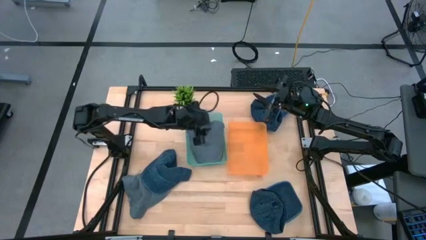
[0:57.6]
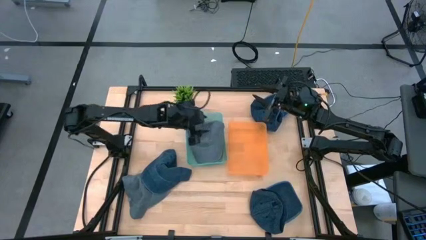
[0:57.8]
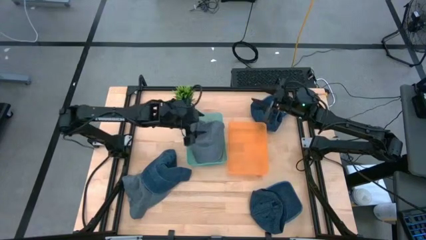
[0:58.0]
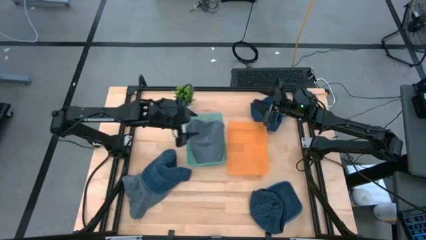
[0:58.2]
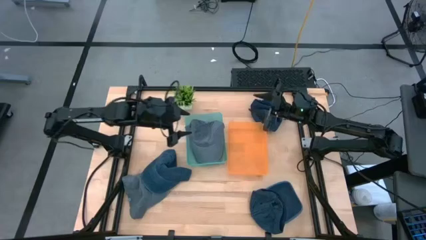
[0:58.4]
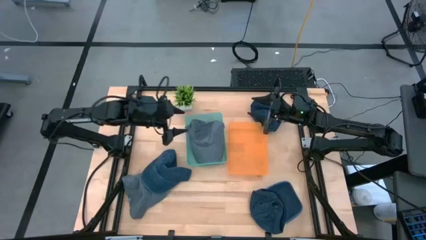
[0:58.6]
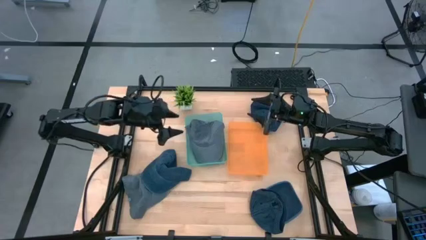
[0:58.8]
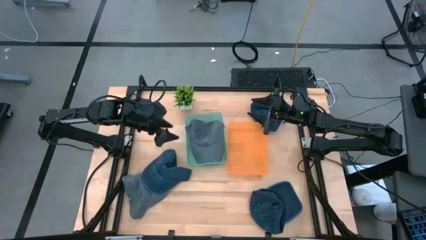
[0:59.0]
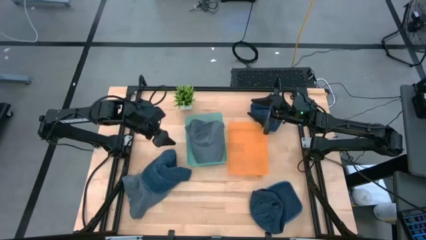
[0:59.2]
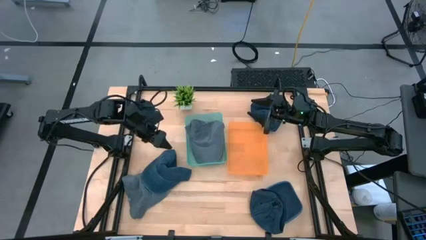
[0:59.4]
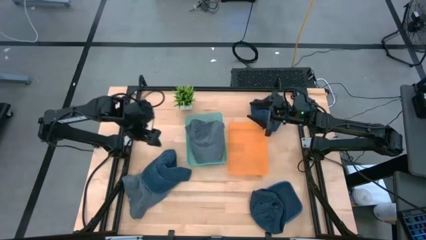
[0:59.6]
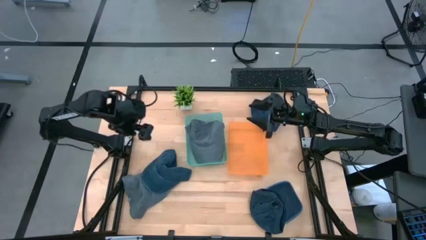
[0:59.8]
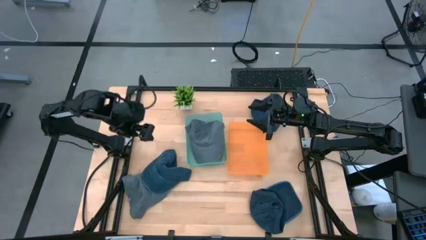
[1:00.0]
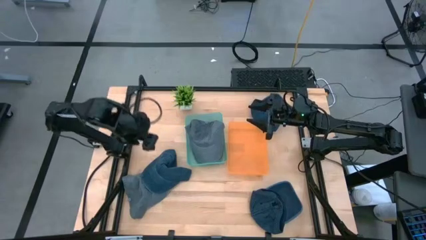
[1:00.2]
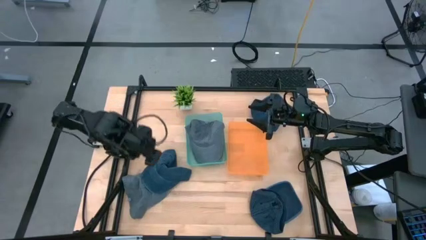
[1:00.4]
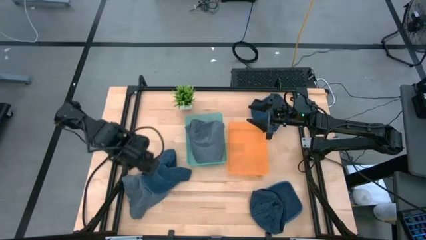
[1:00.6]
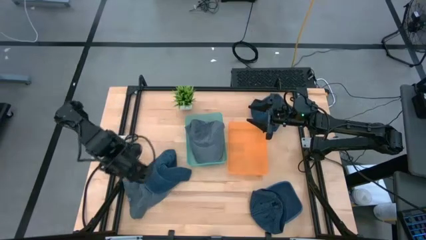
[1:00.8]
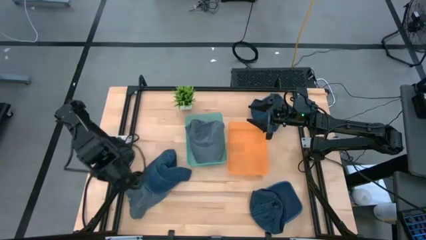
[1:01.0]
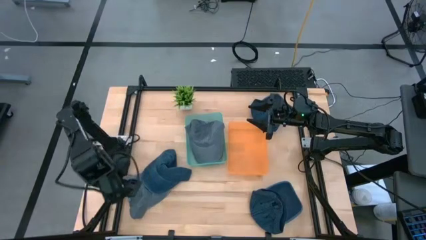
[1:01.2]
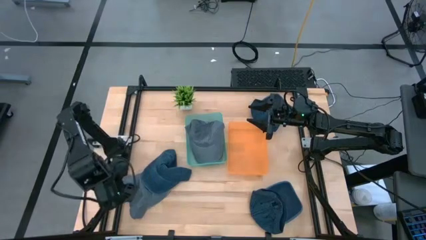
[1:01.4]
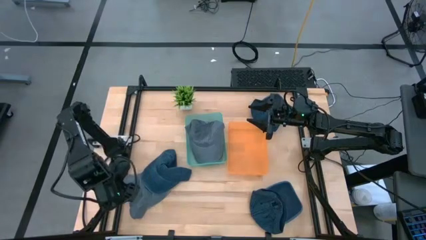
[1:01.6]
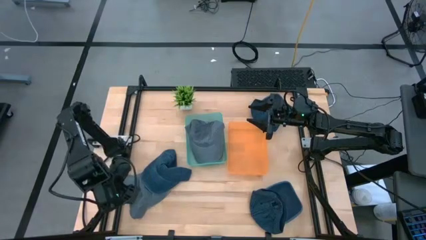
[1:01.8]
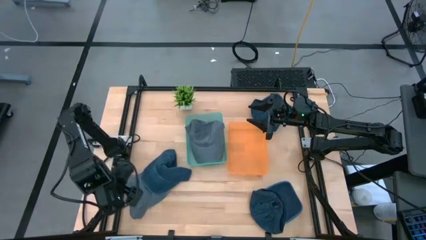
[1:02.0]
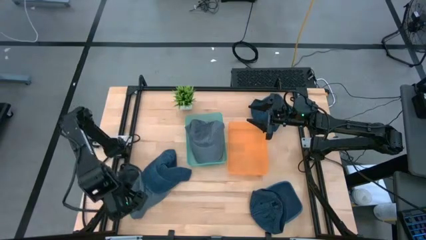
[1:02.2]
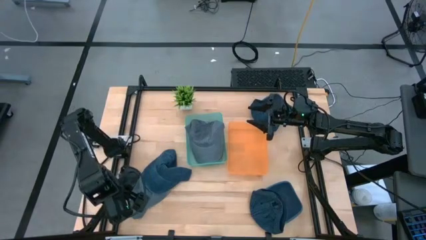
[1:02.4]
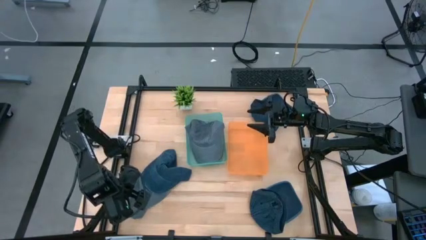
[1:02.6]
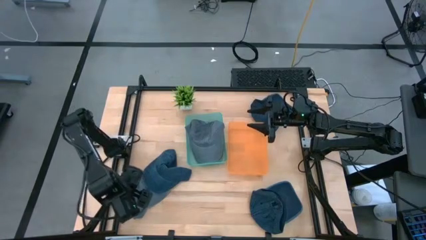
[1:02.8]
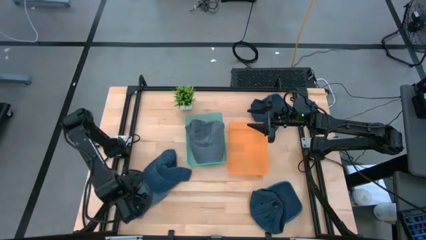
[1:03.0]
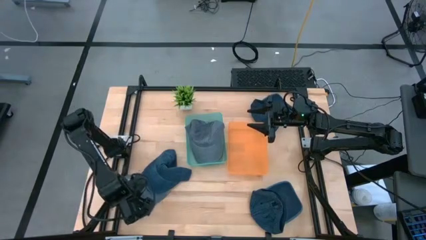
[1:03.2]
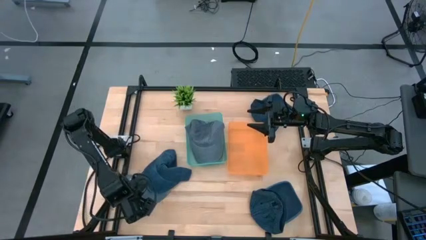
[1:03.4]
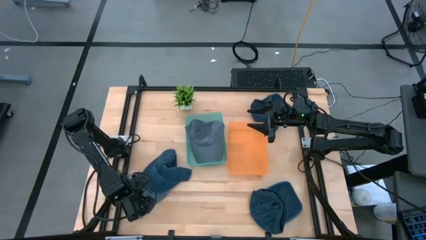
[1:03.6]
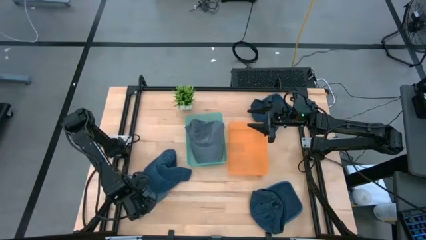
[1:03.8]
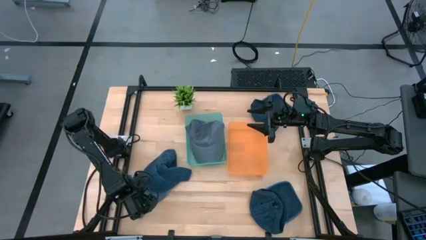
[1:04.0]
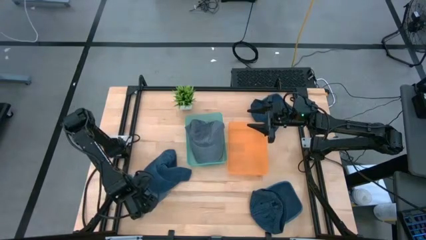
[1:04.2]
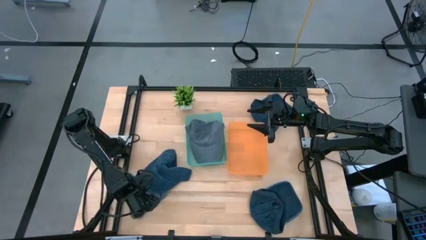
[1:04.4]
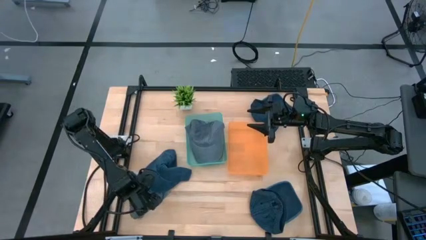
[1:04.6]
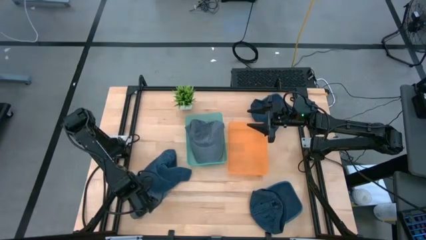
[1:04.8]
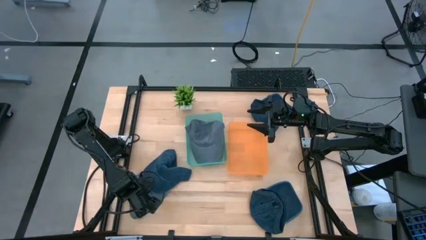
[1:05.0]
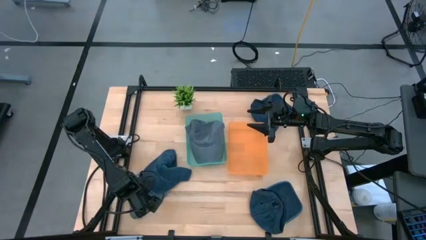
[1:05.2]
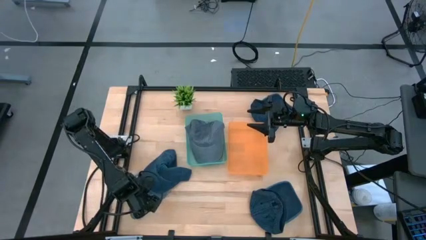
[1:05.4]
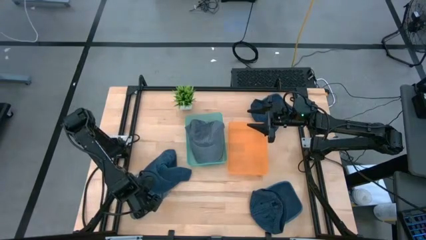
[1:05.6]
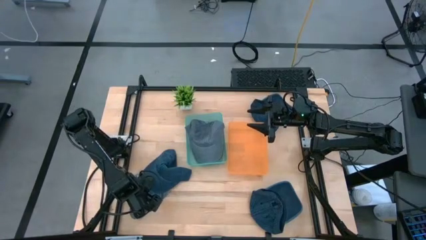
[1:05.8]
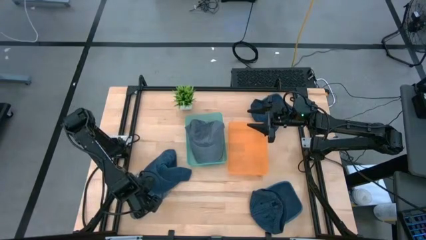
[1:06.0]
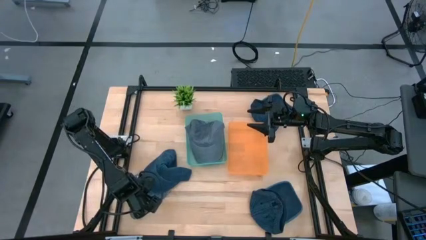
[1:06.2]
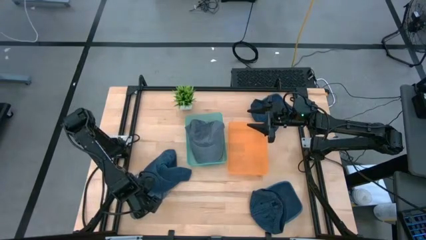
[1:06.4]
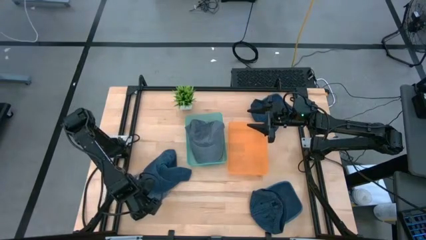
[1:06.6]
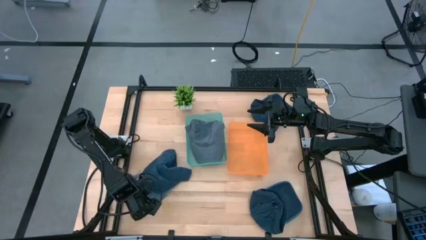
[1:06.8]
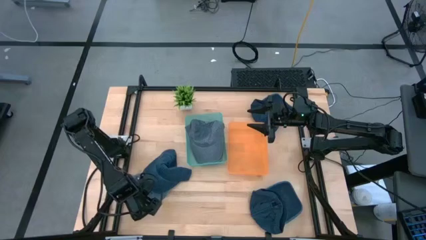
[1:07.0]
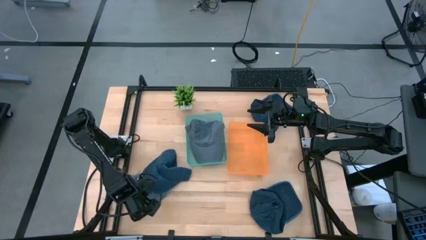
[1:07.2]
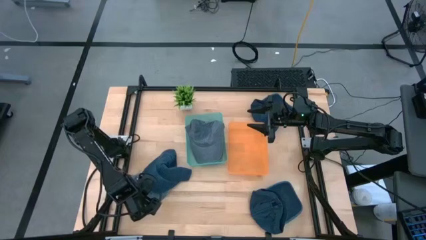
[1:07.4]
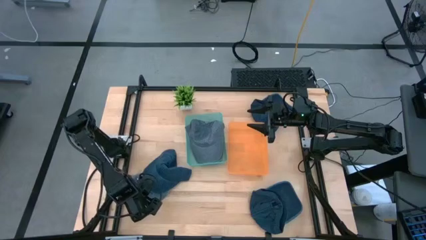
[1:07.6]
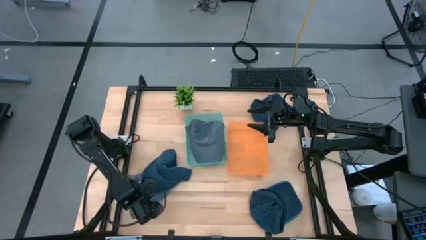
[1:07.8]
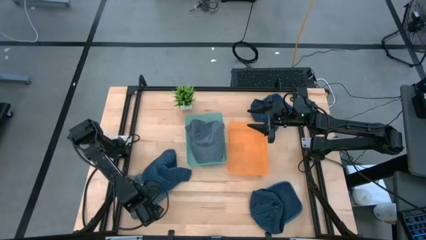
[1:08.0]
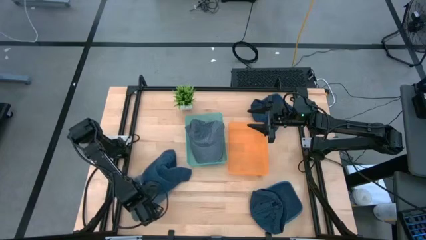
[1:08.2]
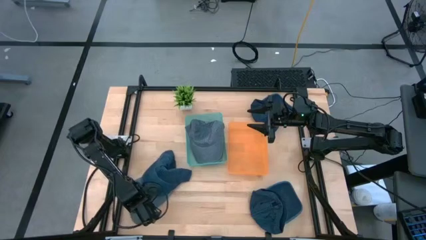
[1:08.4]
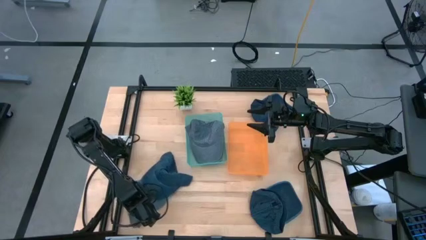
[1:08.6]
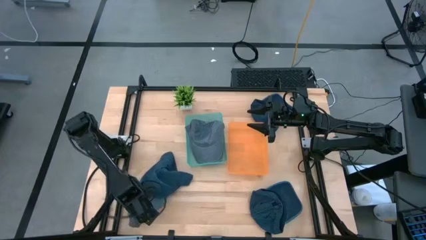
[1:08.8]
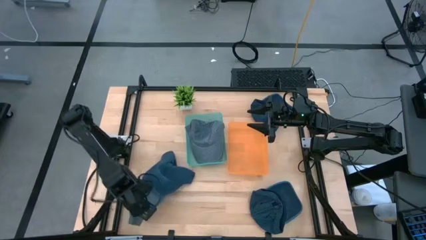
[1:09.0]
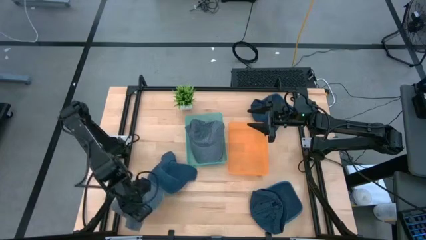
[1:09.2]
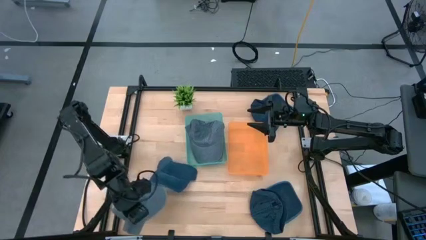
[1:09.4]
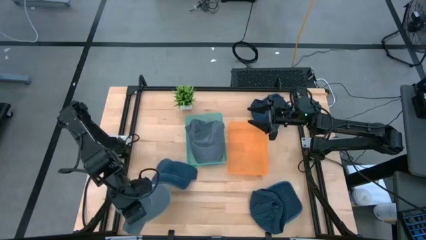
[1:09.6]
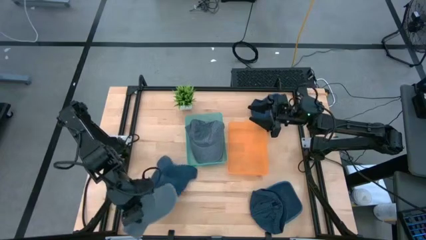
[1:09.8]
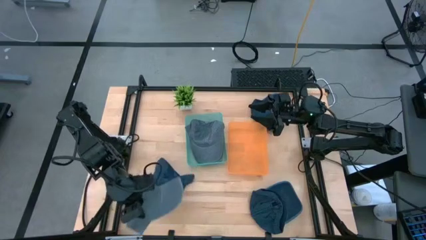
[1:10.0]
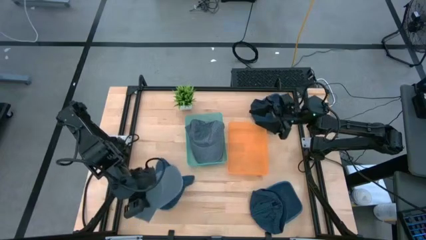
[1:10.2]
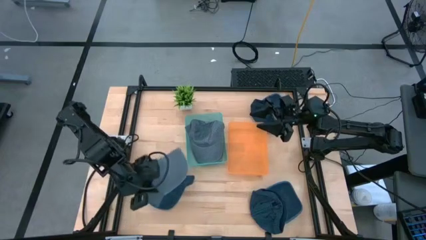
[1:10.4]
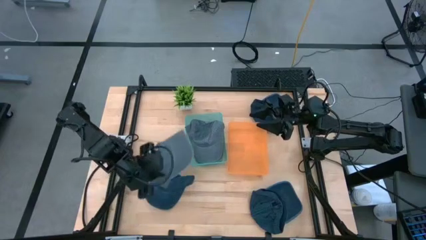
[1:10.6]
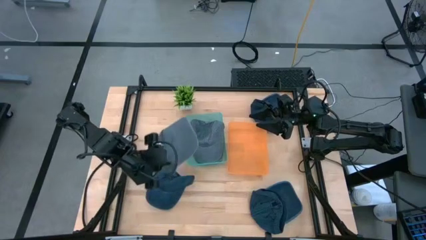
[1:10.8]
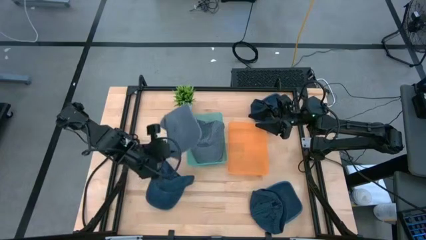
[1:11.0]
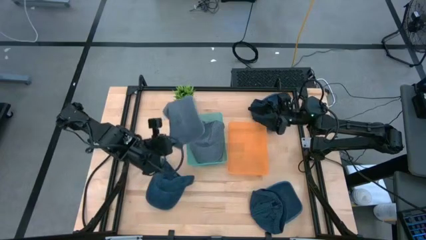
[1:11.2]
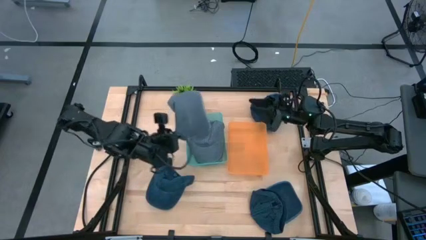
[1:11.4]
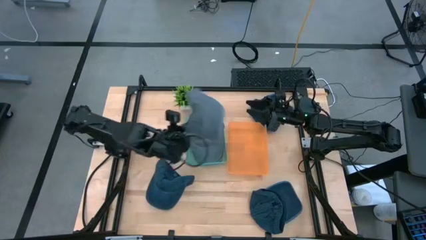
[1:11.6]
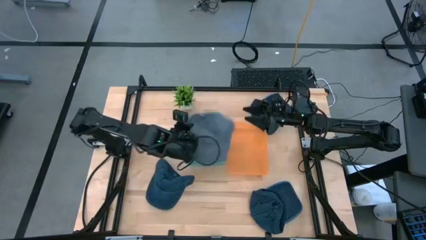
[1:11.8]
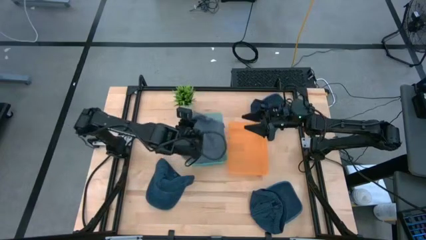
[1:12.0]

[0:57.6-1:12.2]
Task: Pick & Place hat
Put the gray cap into the green bin
